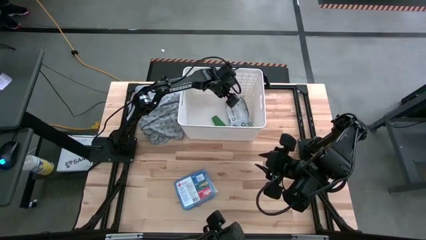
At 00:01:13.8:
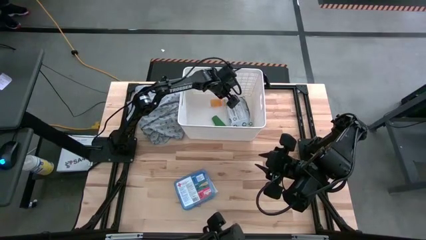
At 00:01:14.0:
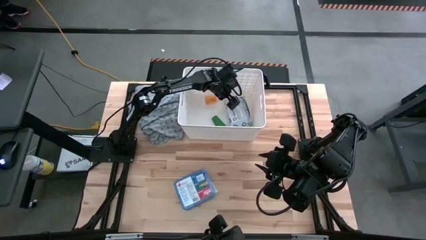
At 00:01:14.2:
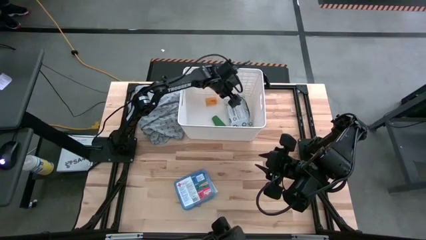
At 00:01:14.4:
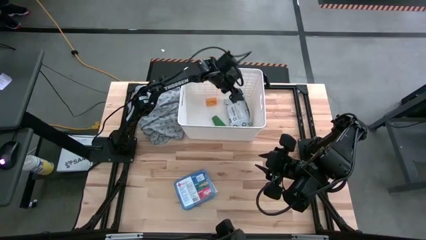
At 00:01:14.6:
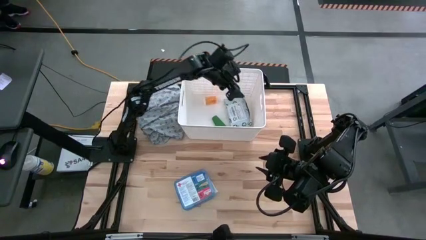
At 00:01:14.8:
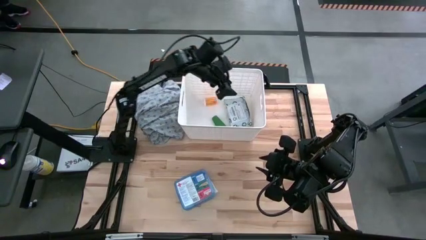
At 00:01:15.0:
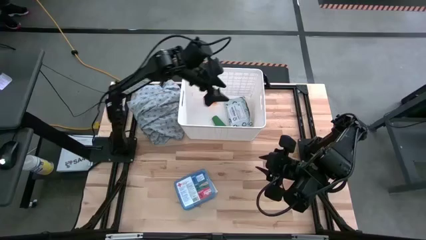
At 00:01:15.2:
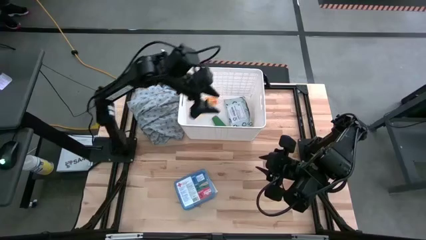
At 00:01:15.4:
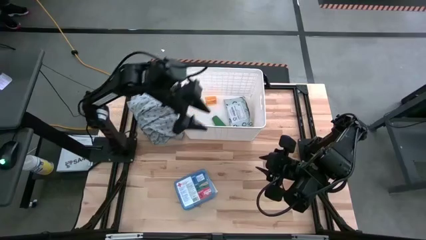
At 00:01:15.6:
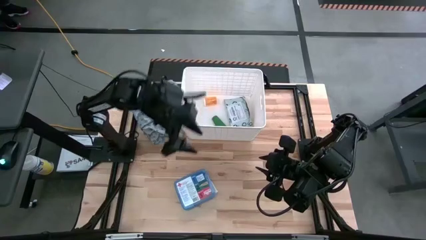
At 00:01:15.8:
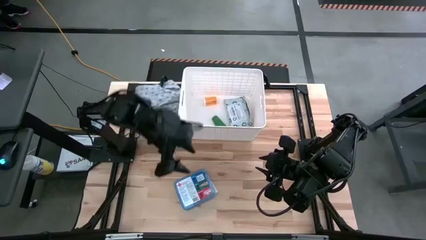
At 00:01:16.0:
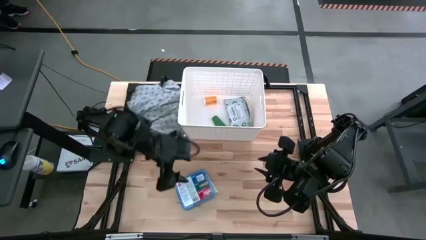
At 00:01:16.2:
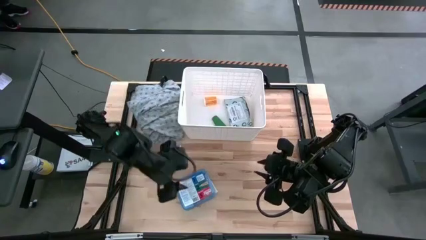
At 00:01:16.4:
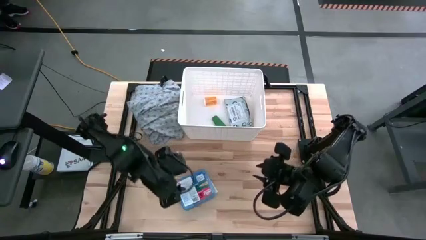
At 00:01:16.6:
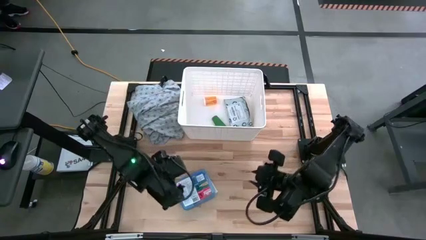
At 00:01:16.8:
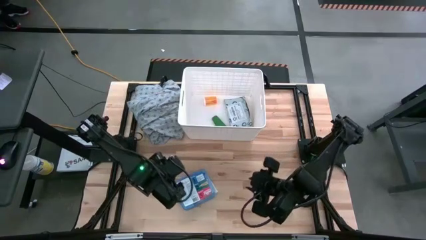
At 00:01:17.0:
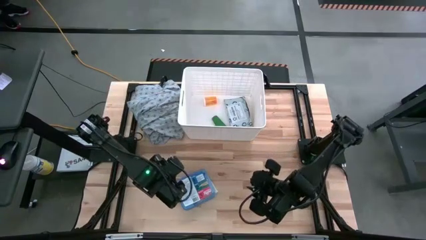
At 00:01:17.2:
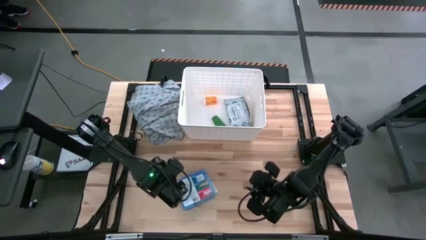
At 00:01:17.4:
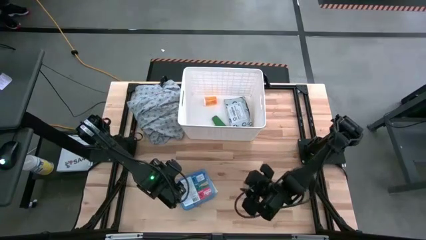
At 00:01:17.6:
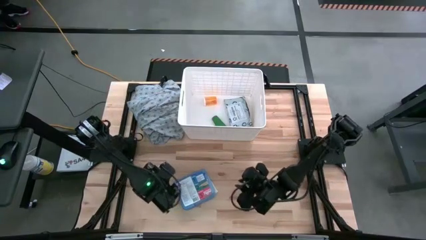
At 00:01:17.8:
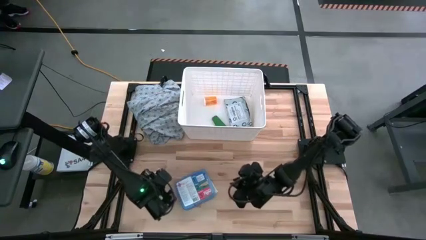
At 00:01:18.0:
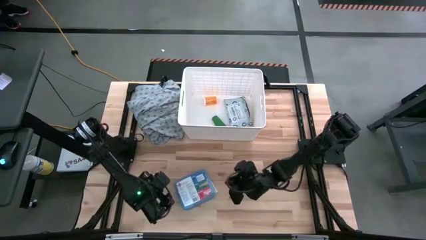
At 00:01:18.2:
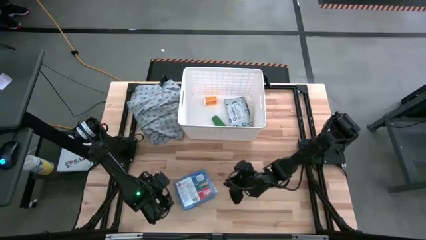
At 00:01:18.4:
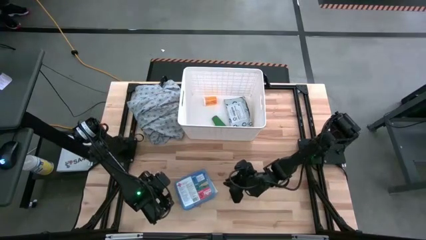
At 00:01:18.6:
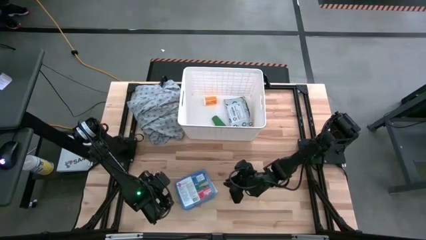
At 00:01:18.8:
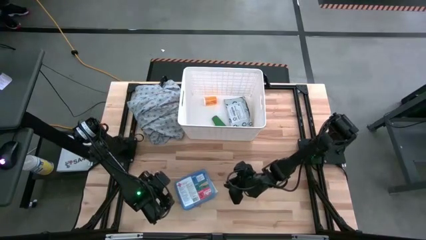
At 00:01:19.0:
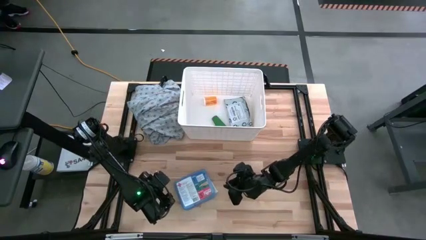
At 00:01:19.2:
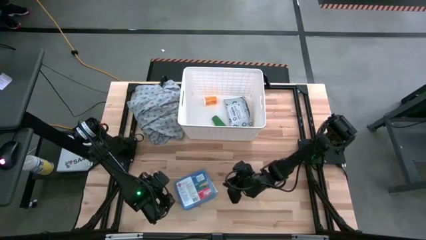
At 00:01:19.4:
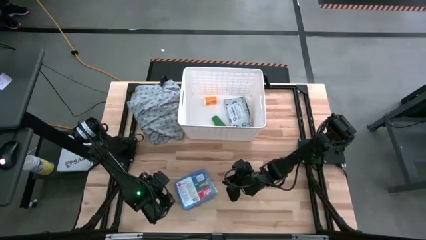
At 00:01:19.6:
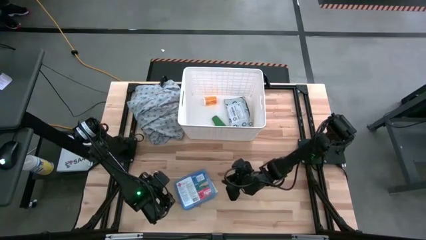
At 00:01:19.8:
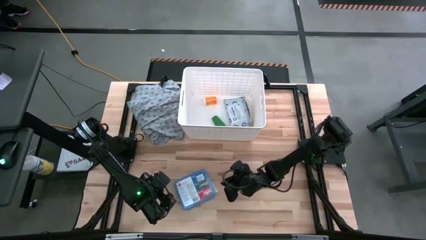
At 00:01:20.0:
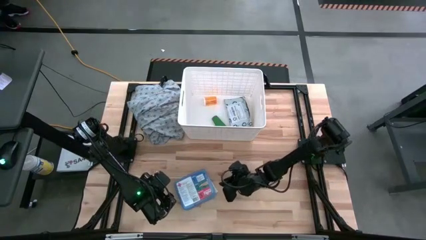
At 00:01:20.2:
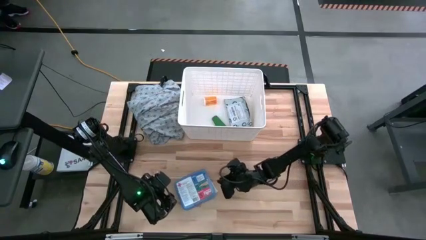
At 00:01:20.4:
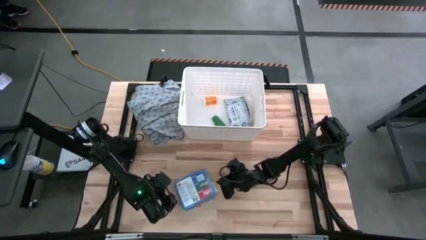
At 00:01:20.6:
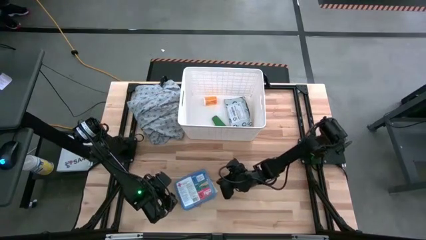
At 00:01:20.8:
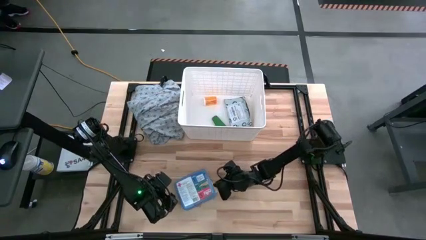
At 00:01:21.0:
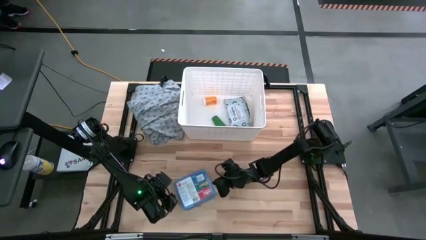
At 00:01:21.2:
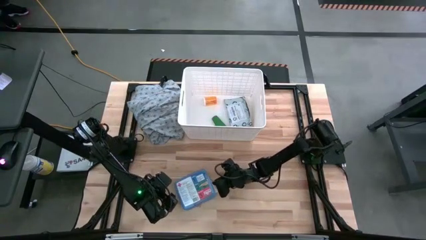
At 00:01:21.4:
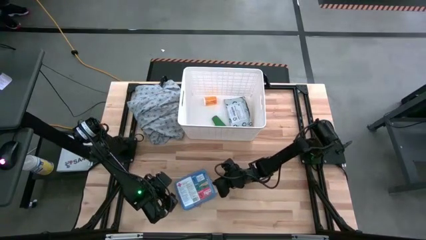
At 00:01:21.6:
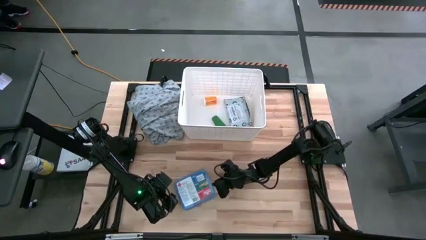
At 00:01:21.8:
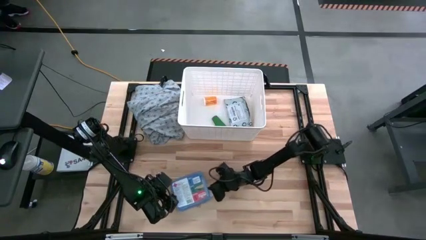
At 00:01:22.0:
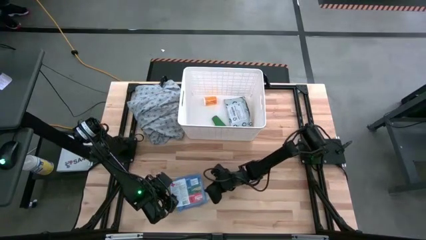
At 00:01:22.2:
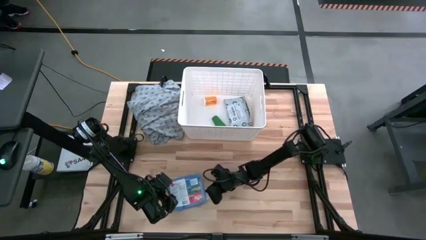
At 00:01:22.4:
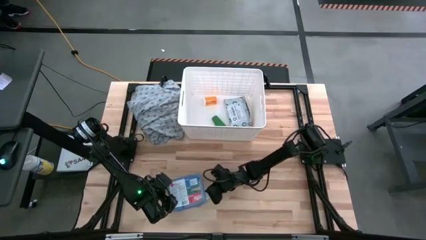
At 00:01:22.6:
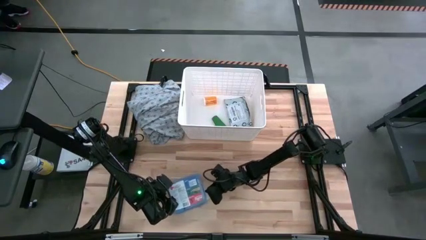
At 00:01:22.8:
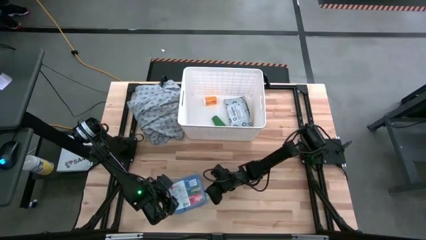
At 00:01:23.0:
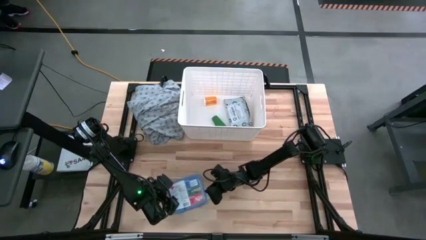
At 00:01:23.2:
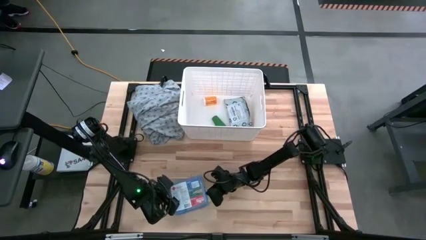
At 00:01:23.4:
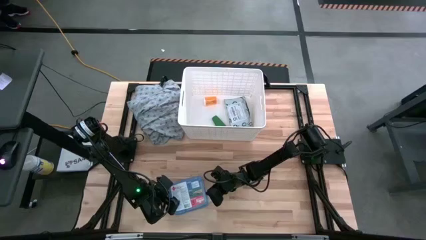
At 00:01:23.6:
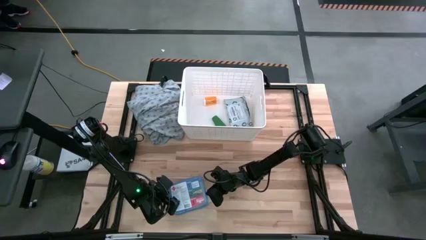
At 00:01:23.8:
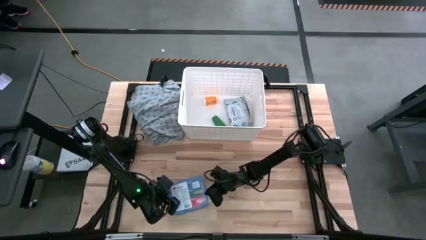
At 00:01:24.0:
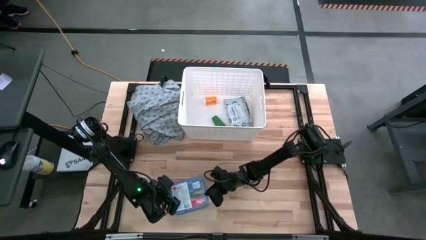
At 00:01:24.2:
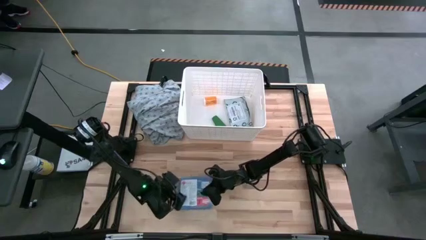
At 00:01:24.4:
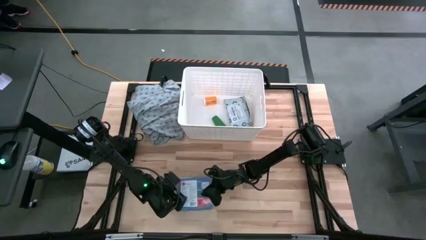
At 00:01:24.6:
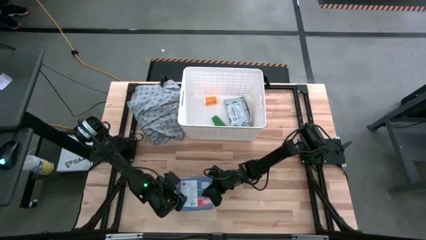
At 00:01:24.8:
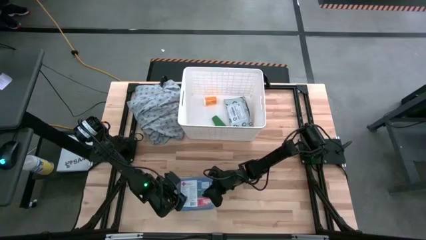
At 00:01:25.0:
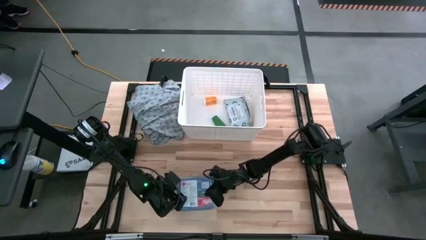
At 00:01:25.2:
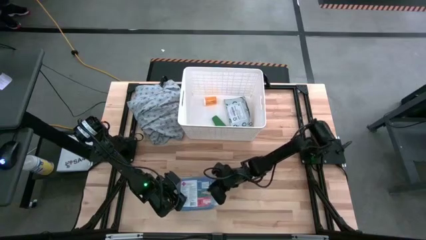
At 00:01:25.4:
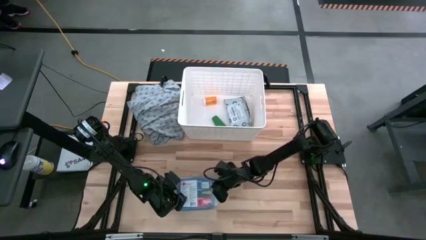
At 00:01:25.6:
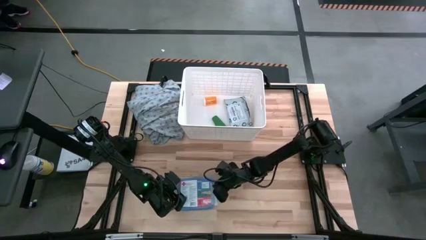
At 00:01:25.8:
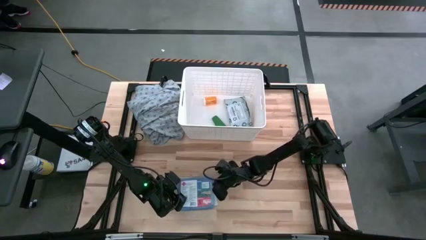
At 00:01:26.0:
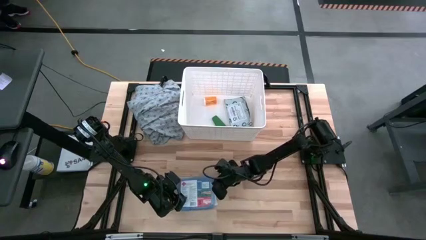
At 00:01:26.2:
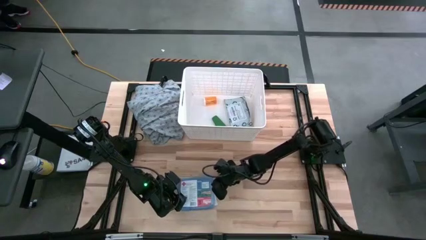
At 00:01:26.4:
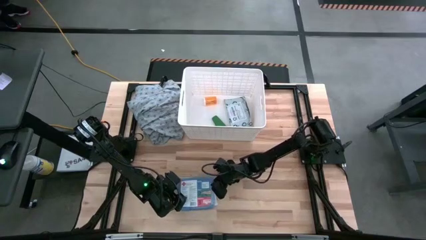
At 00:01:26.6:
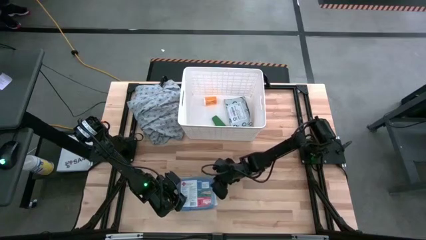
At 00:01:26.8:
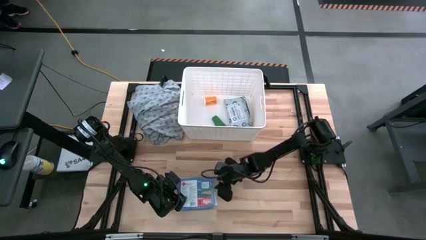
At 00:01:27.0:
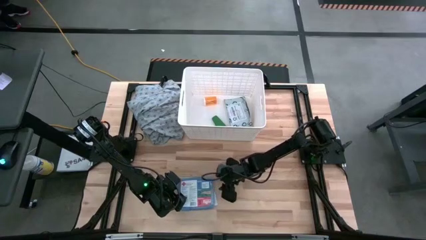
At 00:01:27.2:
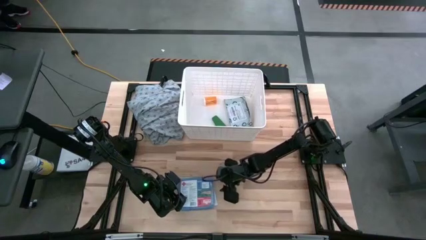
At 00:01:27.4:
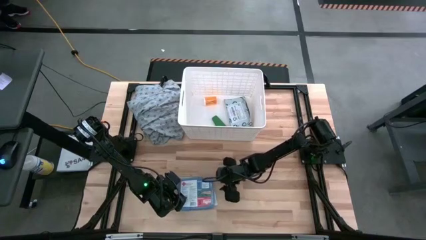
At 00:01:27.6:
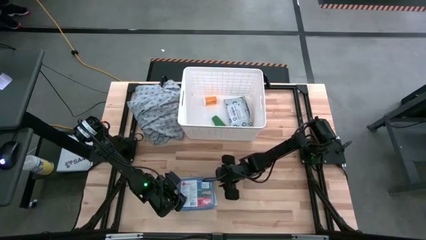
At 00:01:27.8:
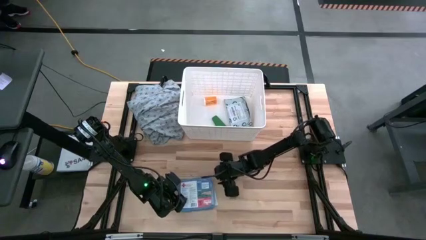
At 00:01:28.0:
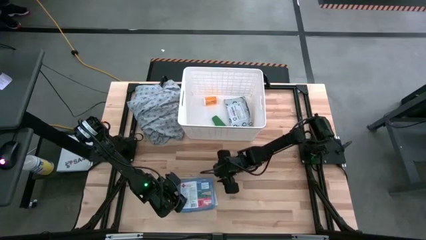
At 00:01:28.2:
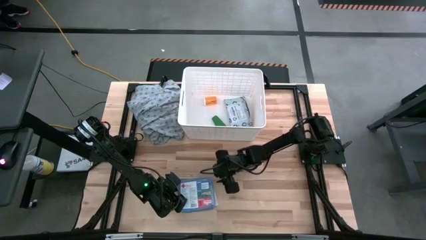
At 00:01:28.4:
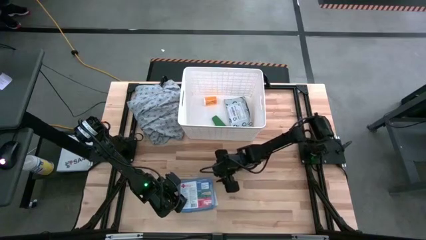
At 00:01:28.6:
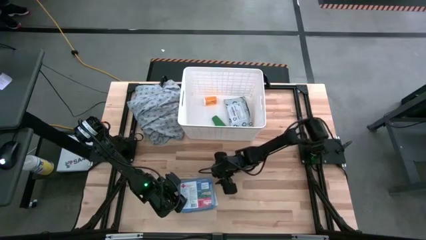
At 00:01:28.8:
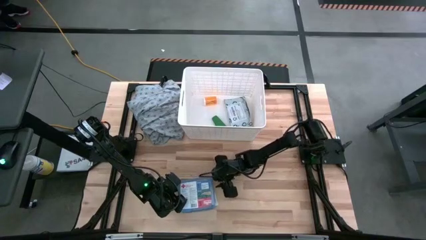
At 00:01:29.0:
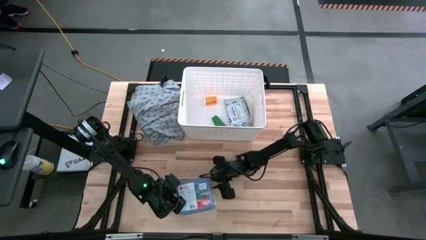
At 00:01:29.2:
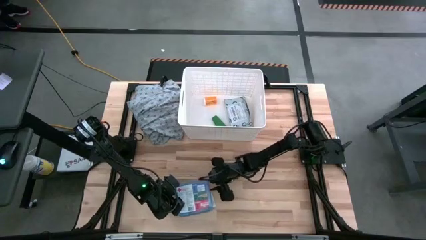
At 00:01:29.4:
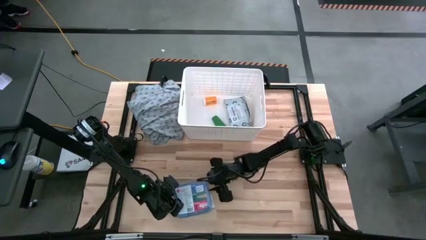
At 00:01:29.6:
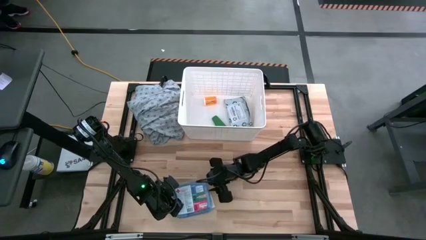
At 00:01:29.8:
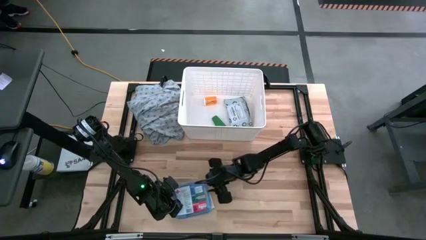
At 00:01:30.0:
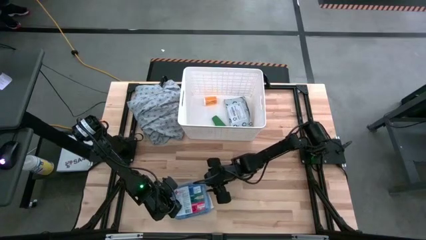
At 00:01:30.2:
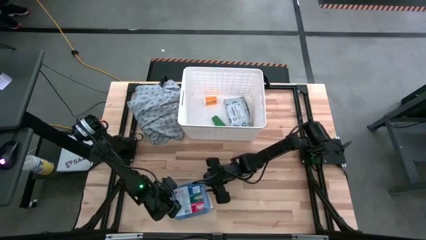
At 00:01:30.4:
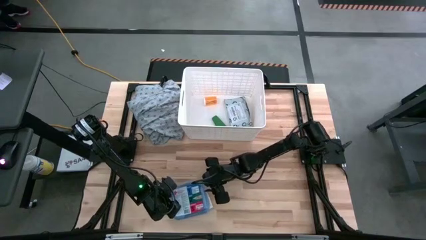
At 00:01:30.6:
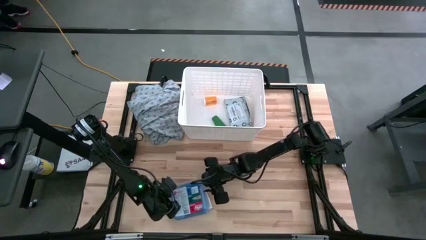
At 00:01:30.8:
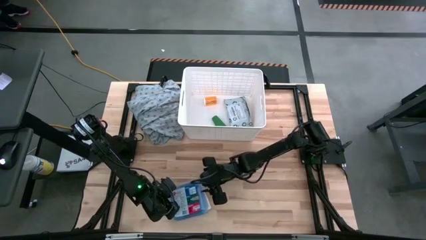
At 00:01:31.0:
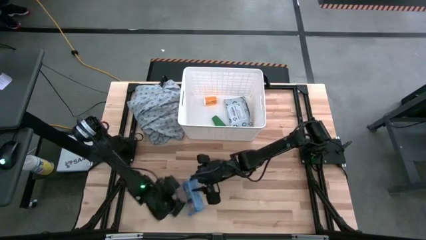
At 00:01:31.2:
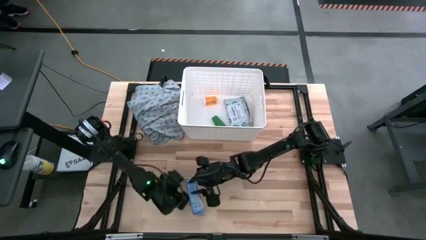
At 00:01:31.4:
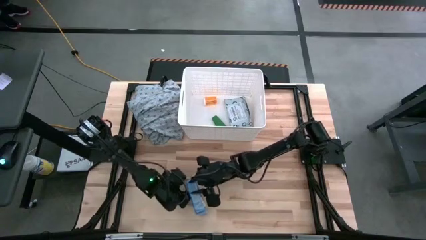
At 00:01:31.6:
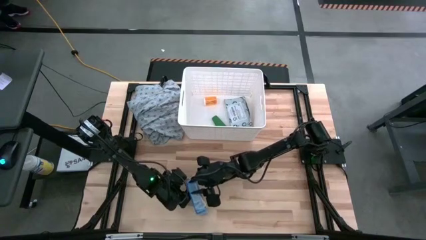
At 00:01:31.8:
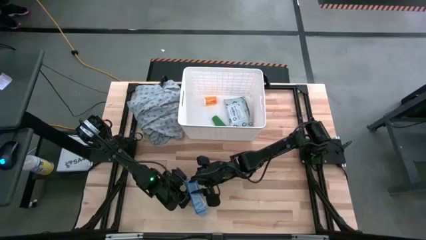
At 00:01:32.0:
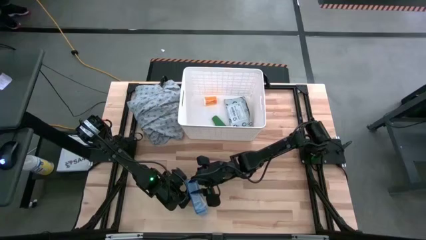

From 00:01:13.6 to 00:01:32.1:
Task: Pick & place medical supplies in basket/bin
Put the blue first aid kit into the white bin
